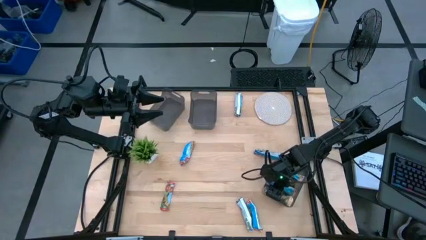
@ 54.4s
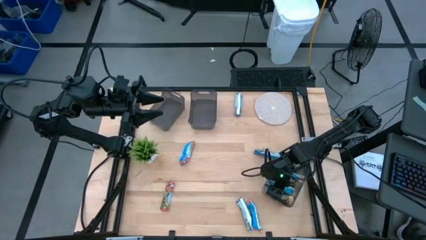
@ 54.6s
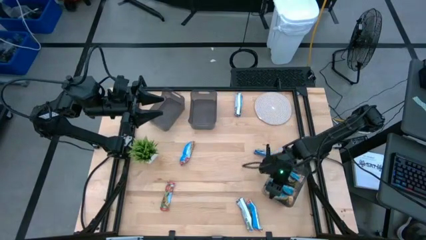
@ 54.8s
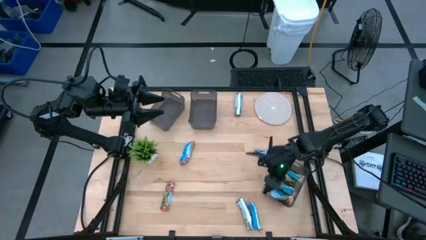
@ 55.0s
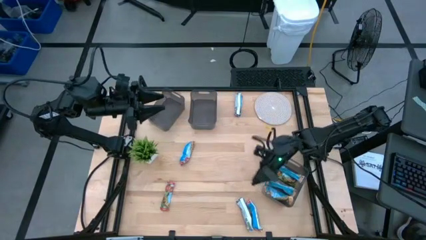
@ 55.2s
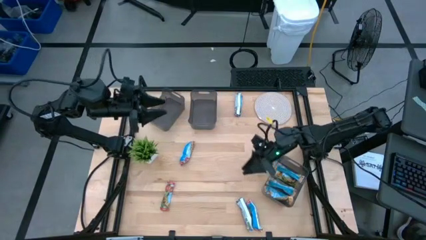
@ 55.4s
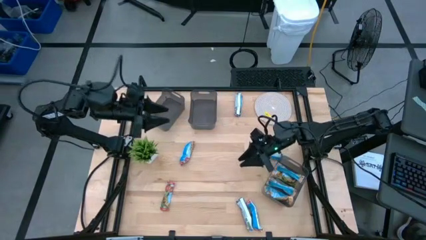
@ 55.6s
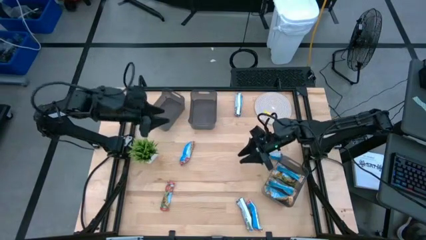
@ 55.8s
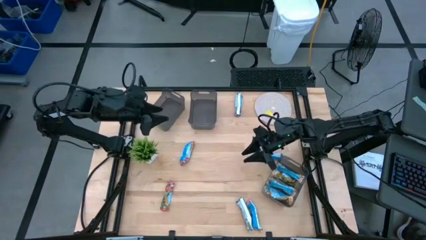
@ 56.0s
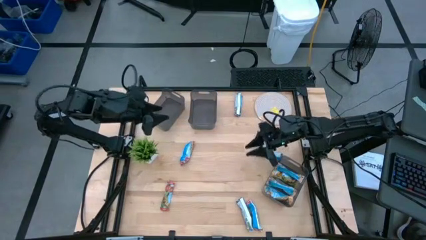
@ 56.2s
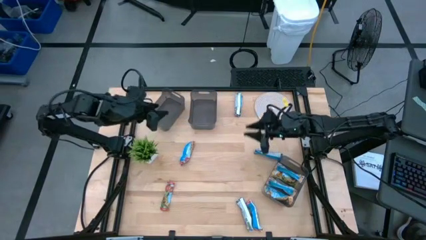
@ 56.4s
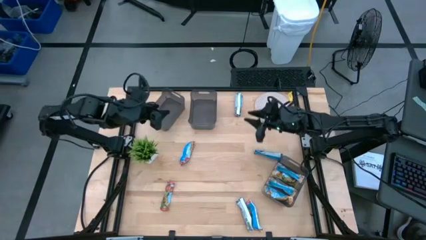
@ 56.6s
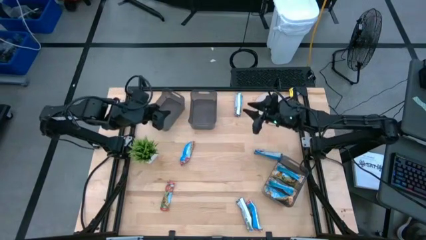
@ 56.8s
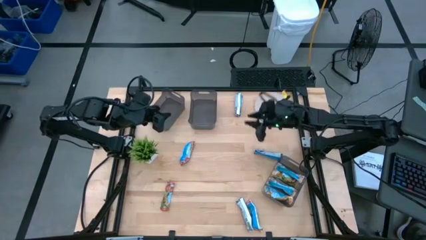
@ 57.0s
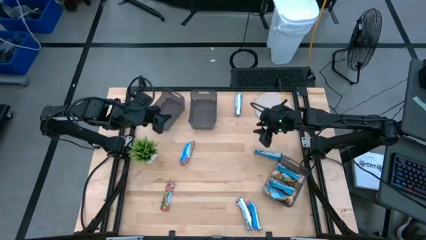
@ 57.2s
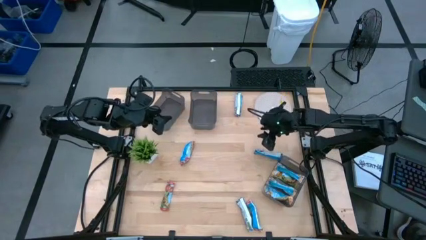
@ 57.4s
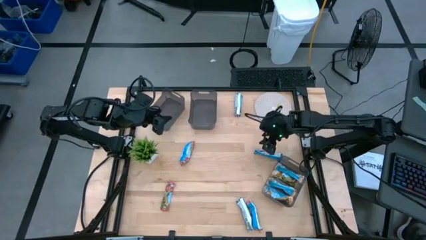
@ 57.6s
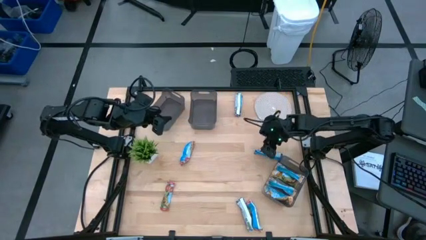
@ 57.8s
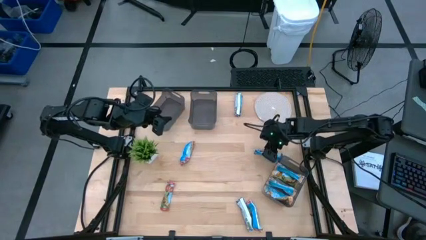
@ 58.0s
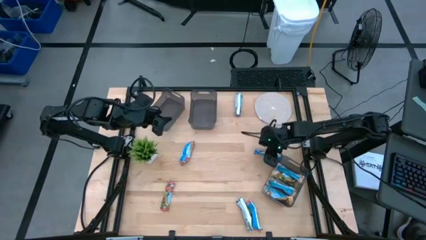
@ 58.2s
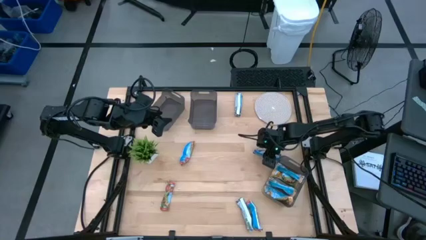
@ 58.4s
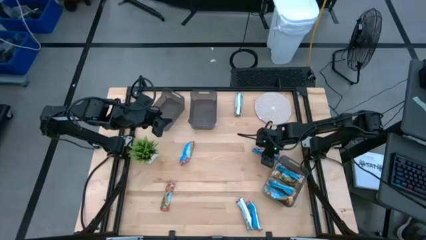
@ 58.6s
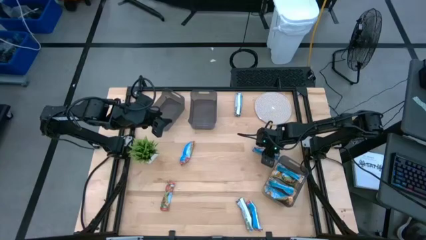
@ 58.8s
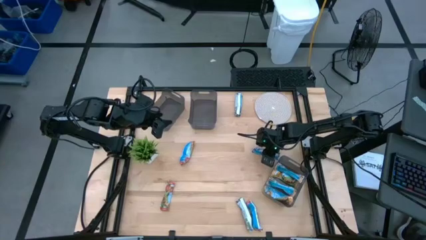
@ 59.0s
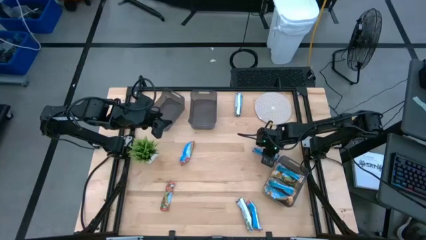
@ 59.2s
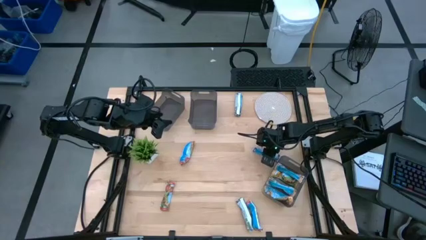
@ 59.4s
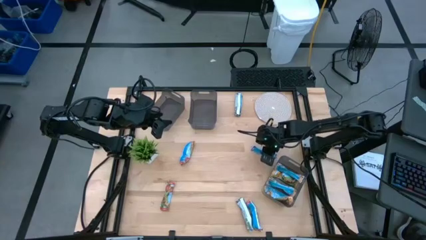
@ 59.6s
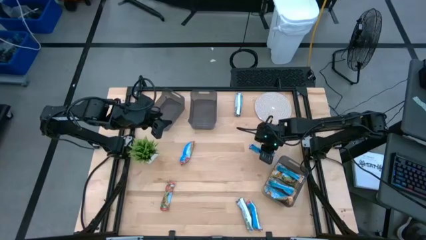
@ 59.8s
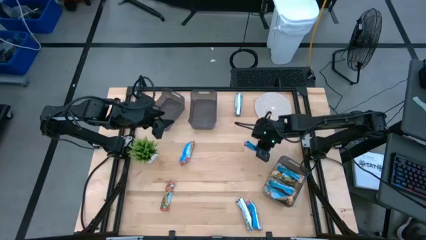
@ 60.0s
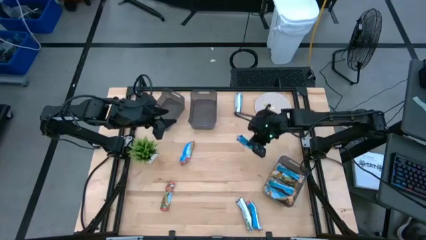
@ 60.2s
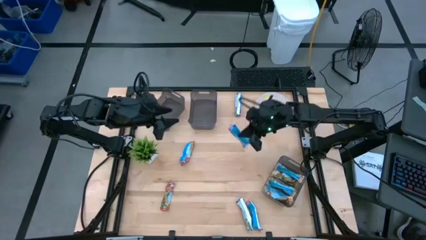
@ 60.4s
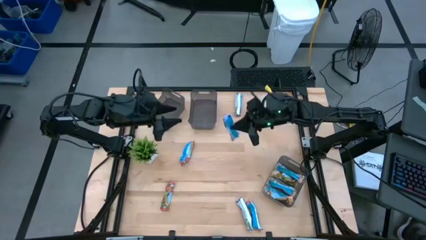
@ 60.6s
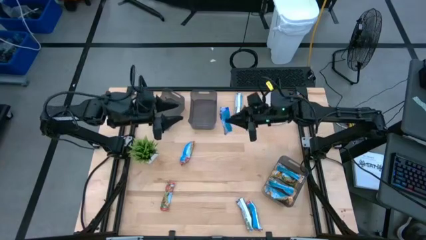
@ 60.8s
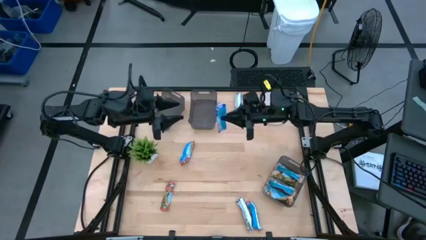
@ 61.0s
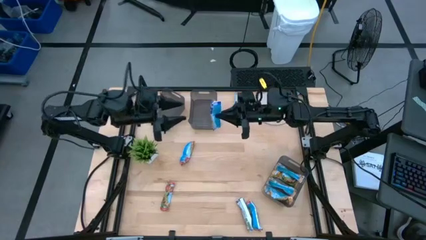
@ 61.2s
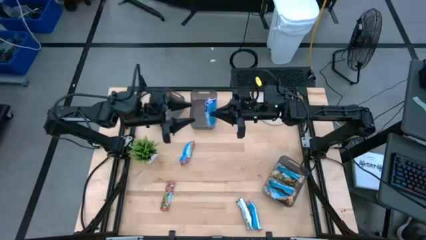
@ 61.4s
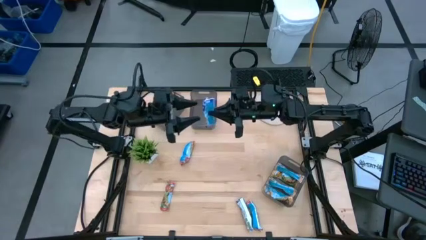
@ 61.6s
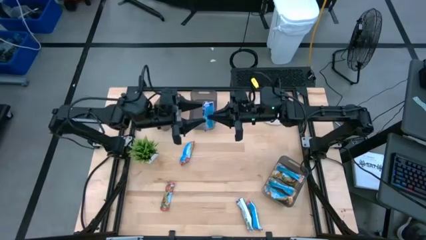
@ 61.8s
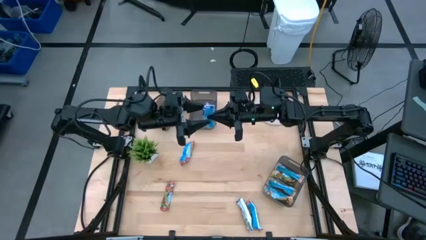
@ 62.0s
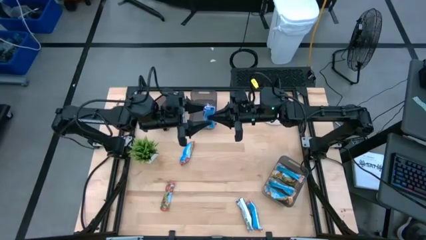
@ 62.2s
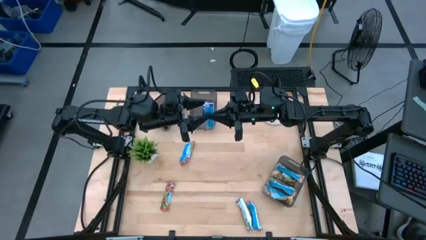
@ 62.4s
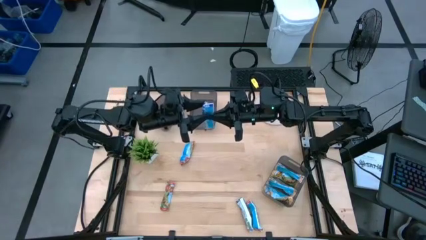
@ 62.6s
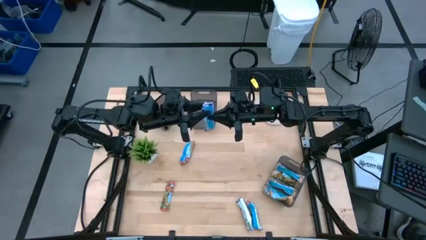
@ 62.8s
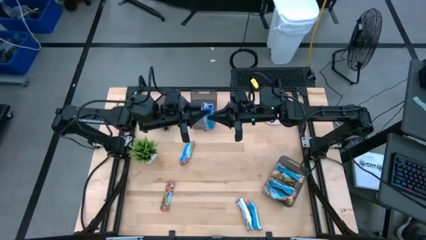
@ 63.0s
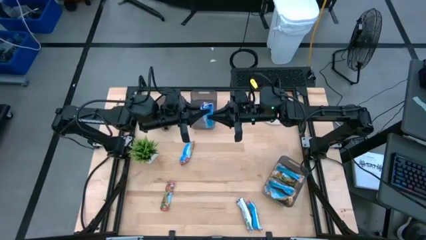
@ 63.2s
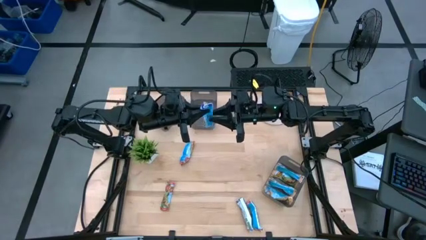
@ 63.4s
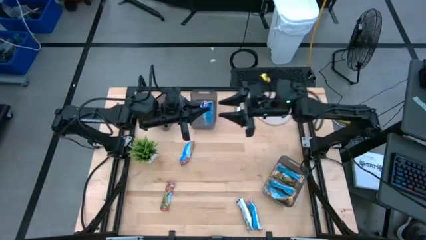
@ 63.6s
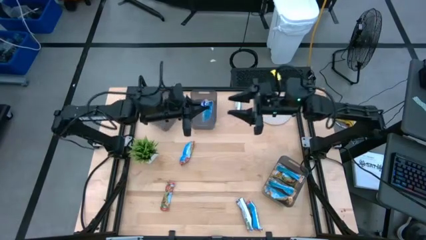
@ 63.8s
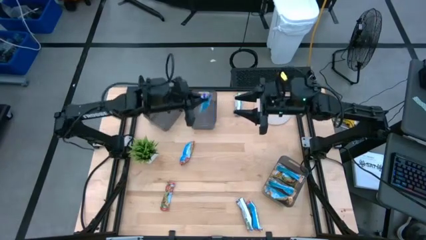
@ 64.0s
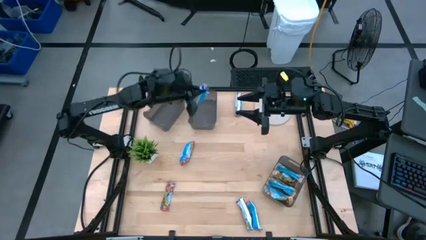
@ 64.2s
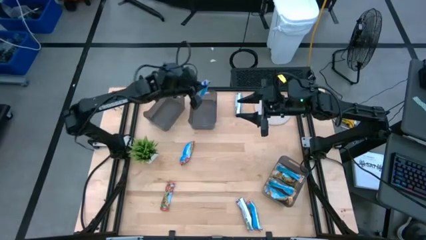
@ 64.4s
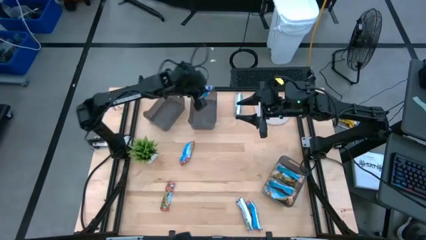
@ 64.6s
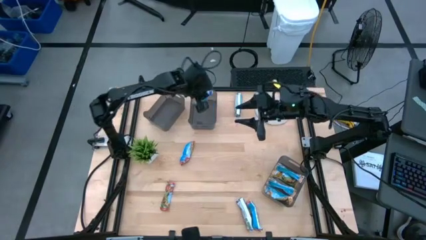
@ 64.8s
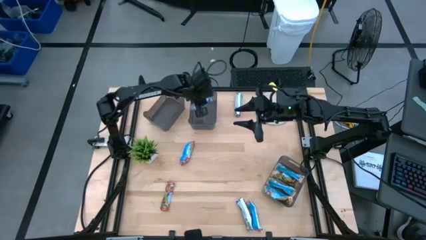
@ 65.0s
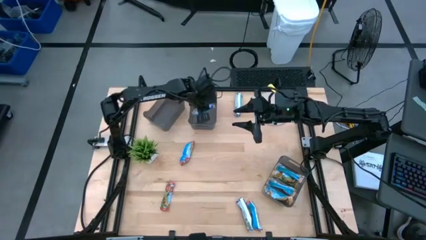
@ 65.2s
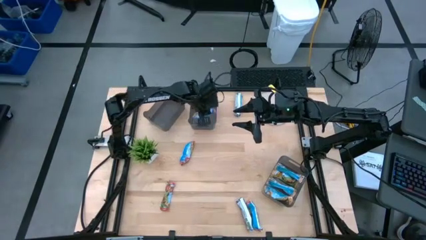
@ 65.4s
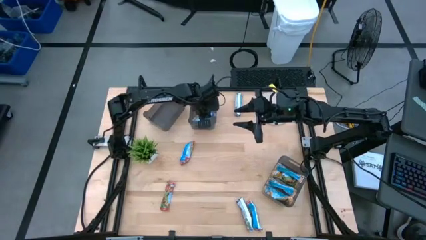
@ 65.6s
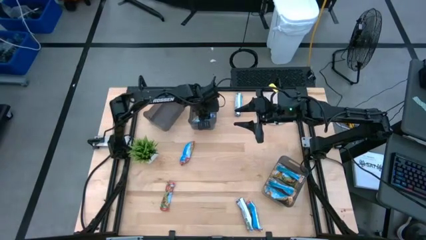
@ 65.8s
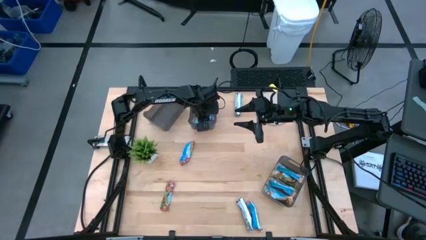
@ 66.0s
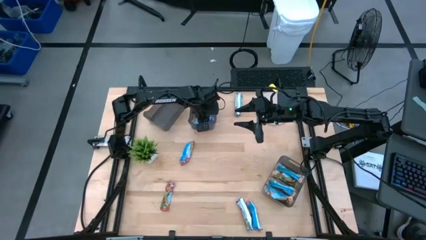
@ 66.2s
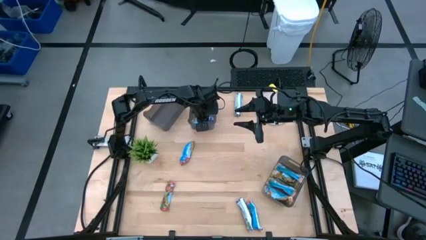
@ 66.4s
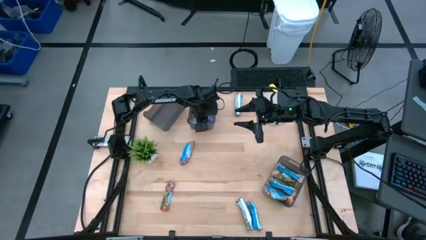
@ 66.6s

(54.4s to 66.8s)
Task: Pick and place Granola Bars by type
Put the blue granola bar into the top right black transparent bin
